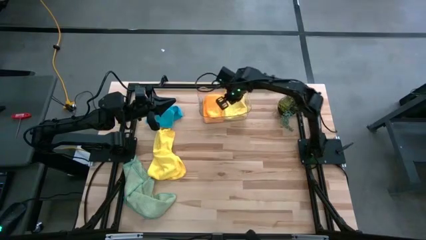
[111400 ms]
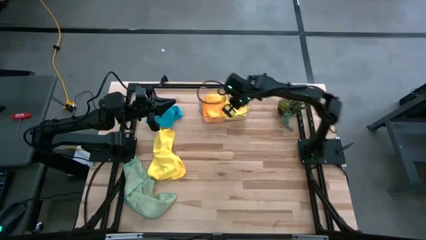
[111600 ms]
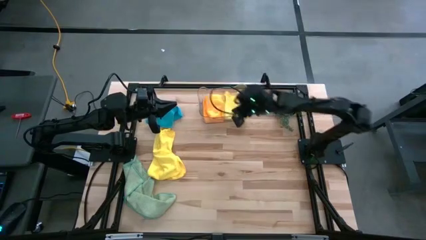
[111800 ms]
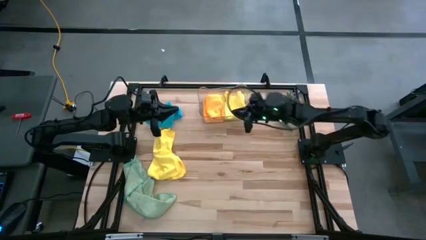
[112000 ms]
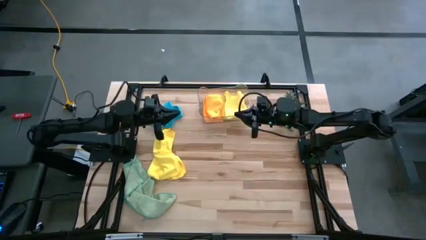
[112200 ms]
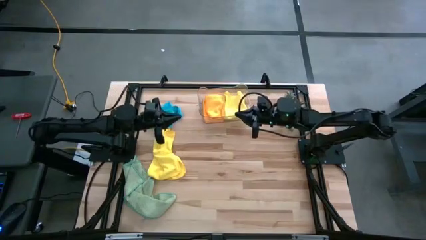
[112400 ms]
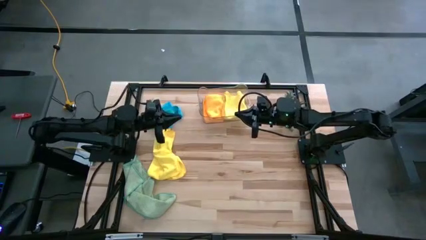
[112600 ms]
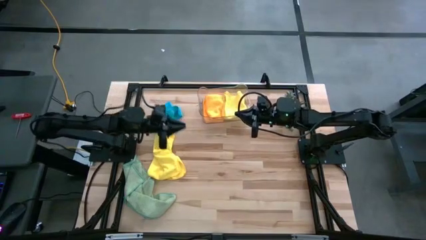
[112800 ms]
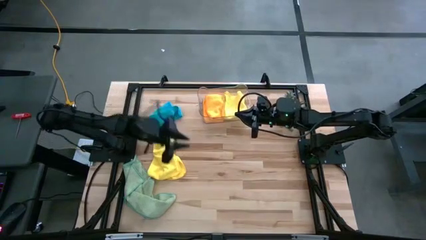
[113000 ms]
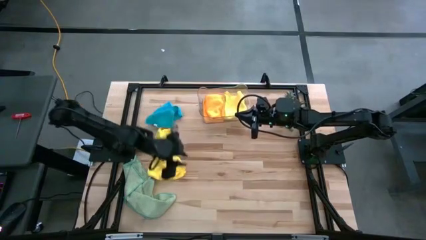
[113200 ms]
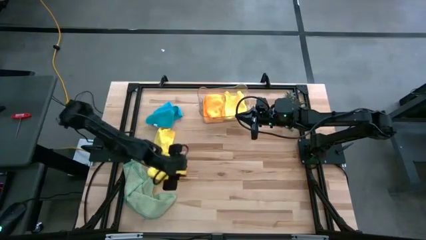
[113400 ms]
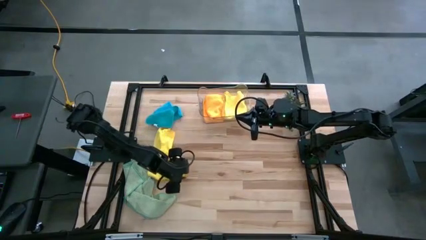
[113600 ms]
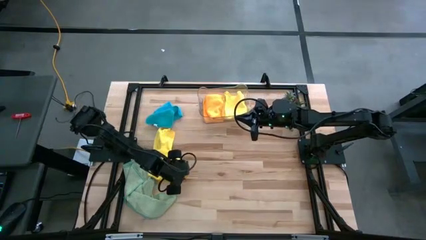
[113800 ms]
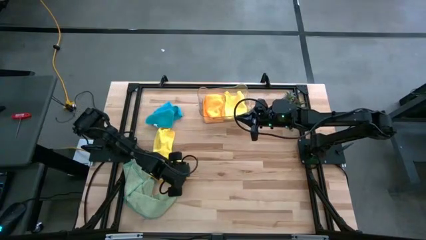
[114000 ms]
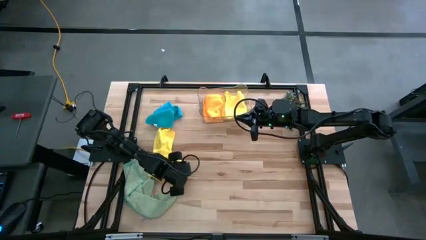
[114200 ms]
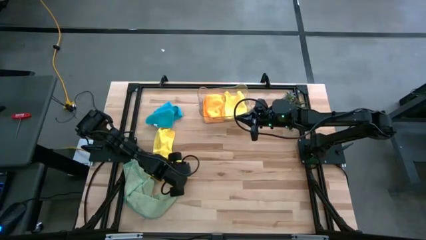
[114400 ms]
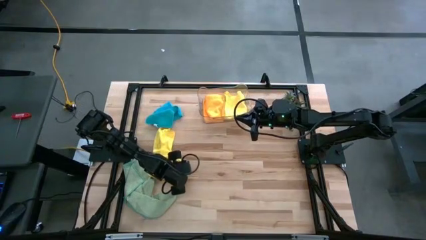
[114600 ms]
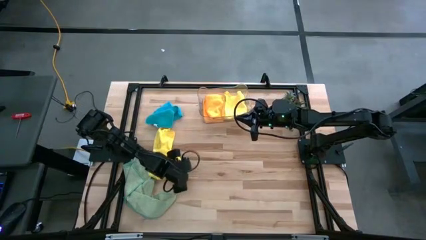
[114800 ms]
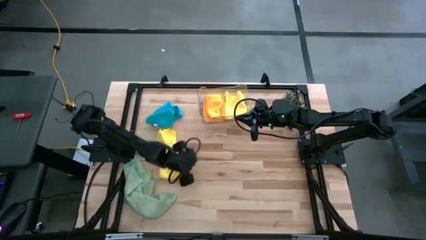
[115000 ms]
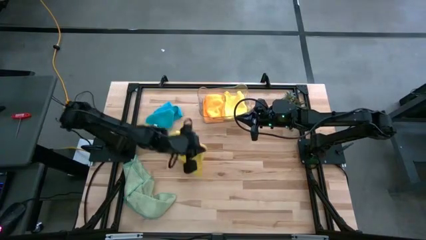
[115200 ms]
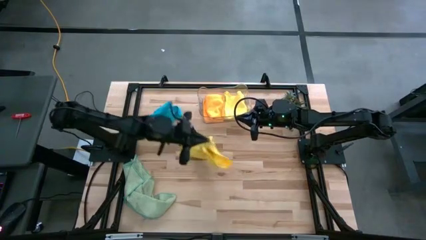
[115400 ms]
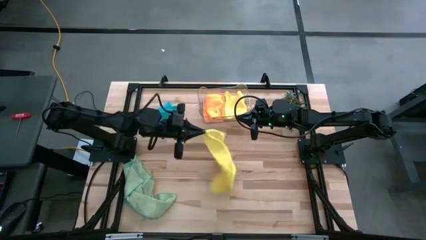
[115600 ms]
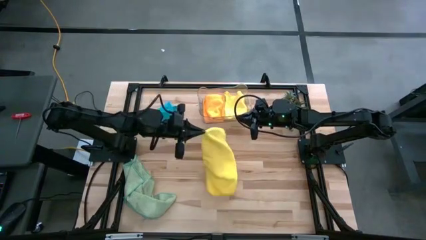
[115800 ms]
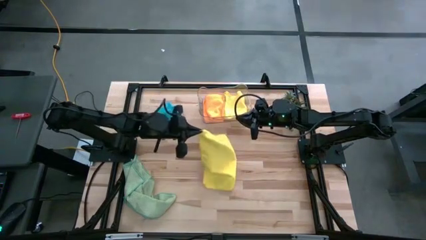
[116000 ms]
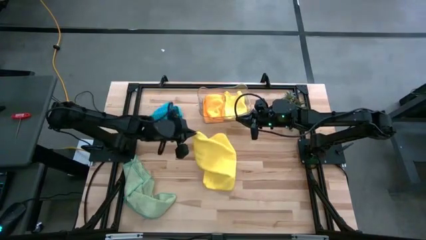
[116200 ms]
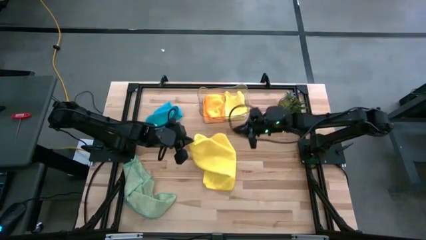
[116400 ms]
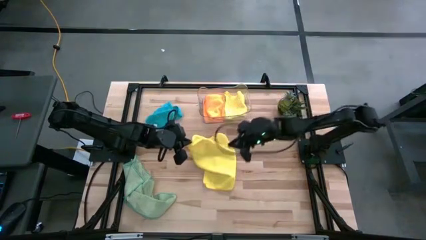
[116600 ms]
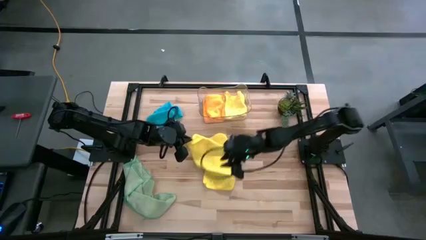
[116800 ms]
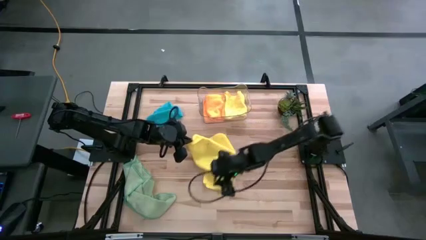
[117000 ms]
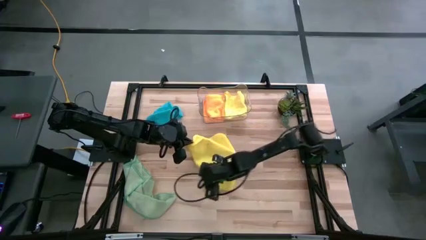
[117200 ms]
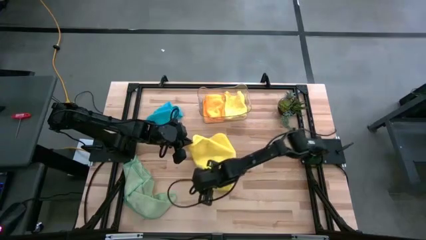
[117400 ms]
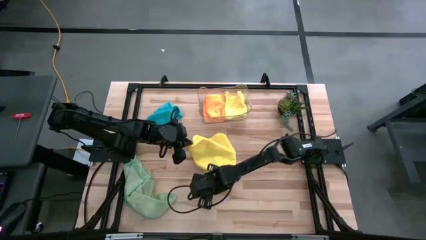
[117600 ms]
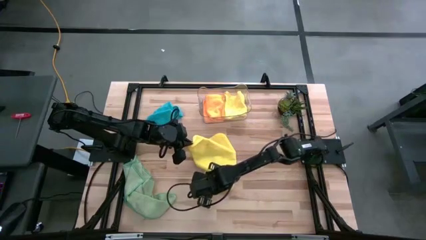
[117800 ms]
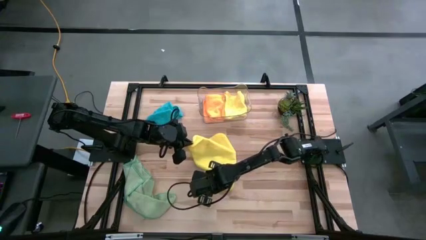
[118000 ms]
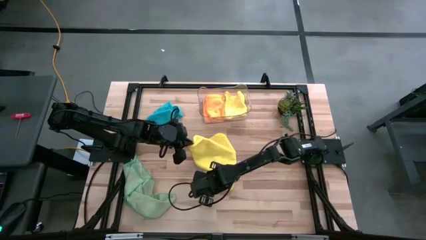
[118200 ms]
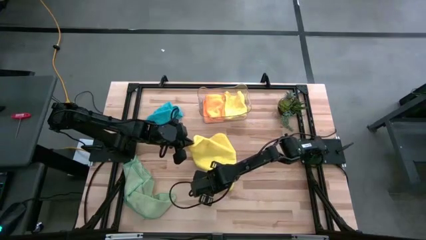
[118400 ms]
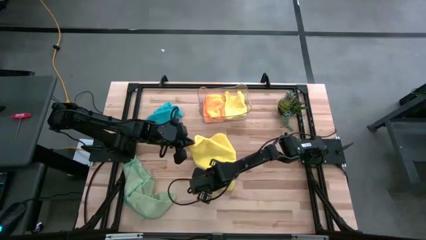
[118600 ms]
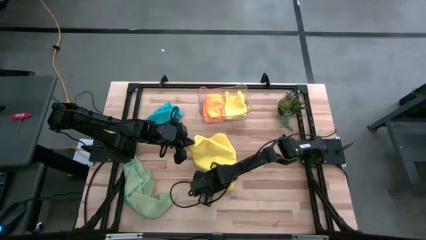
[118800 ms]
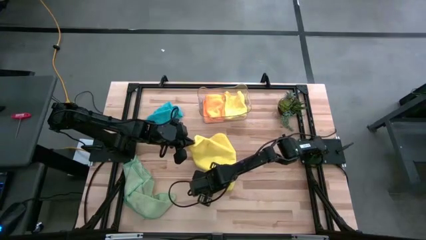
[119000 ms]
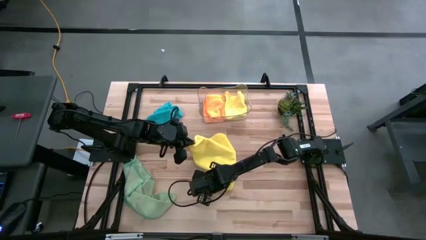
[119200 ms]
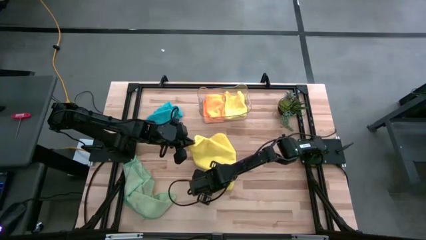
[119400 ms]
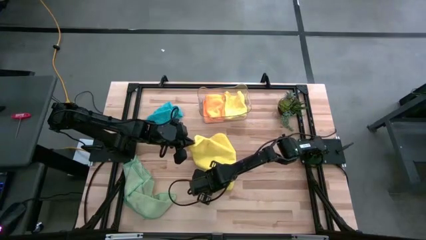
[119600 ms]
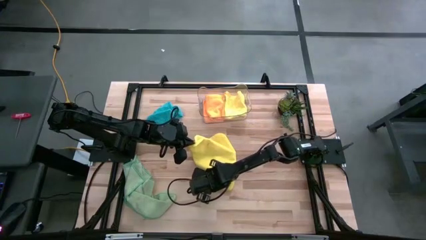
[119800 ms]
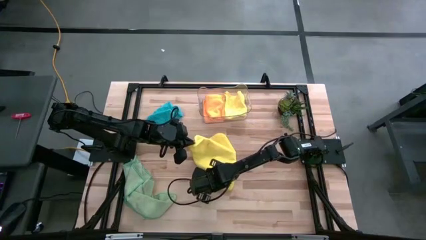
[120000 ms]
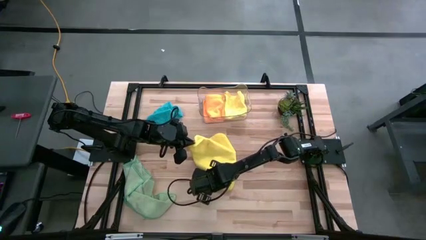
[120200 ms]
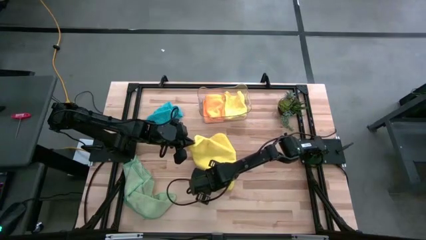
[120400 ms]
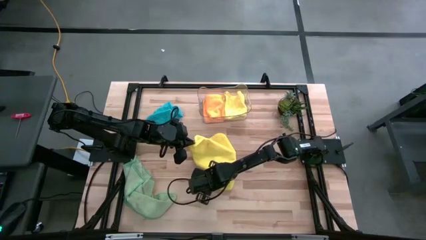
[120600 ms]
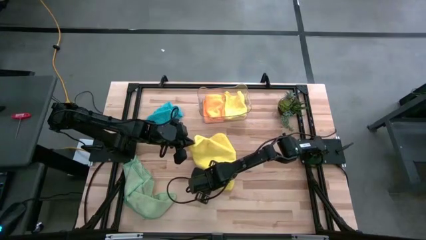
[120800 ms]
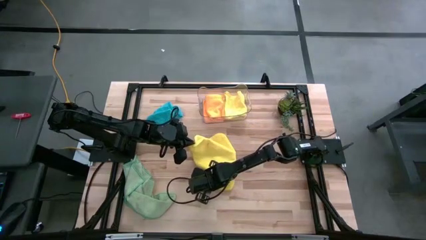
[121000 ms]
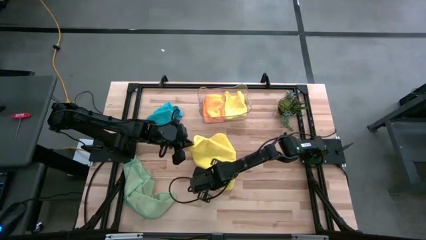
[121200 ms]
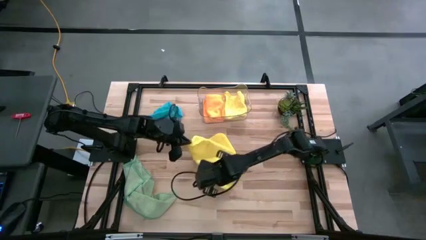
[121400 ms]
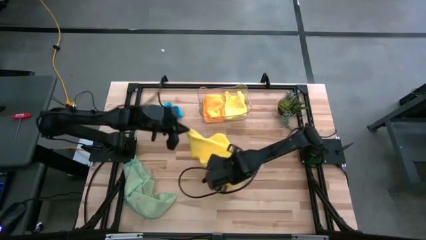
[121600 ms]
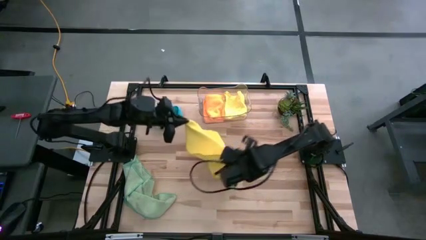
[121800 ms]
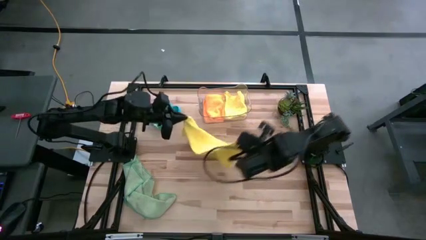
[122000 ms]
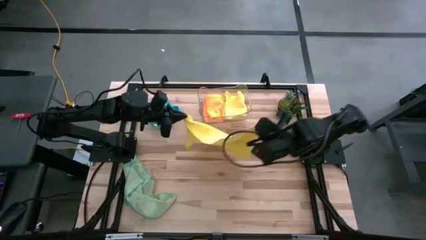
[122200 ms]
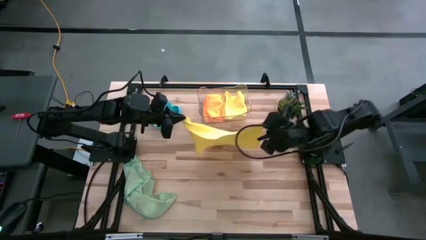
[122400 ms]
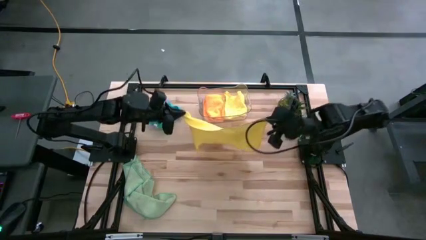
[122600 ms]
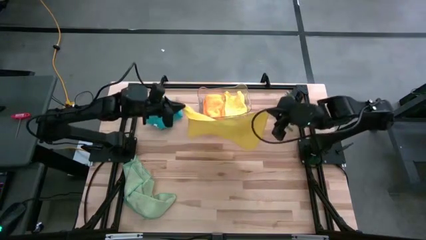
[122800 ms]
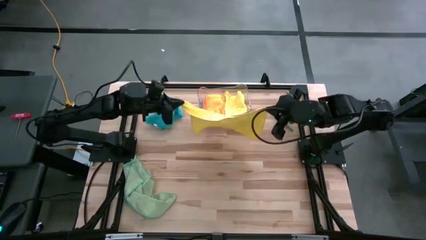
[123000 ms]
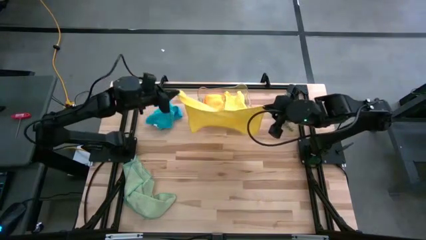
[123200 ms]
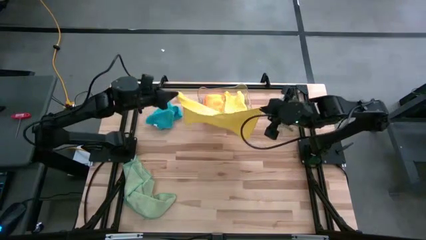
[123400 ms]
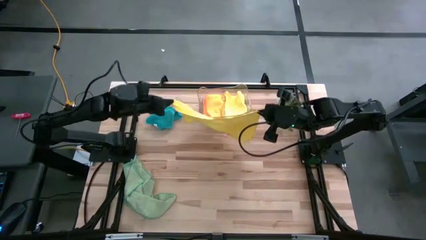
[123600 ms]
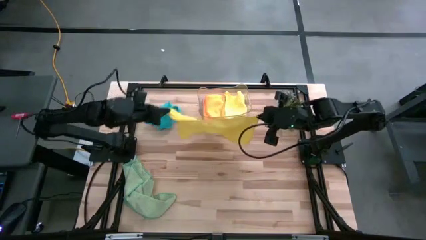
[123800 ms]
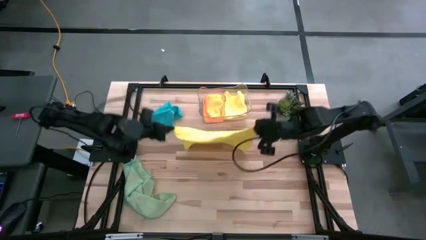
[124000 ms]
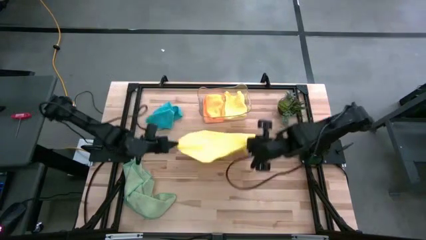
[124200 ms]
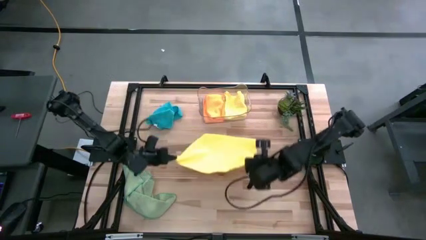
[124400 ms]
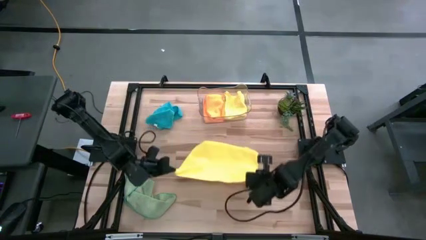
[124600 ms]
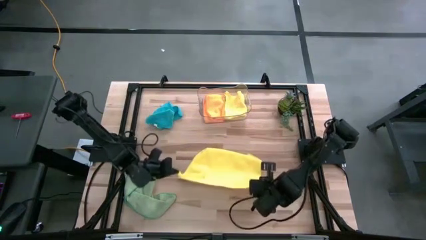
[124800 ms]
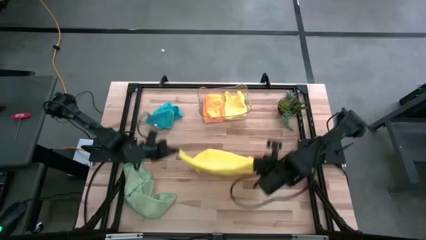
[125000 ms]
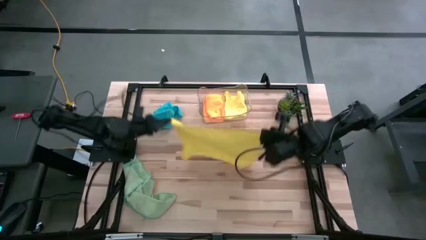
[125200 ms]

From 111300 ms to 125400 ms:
Task: Fold microfiber towels
Fold the yellow microfiber towel

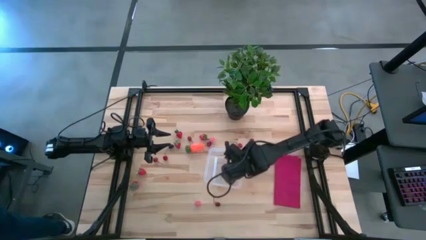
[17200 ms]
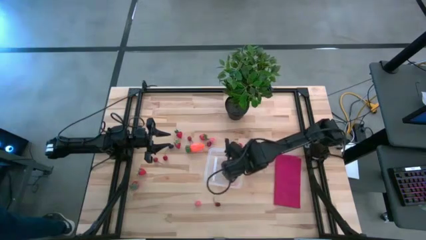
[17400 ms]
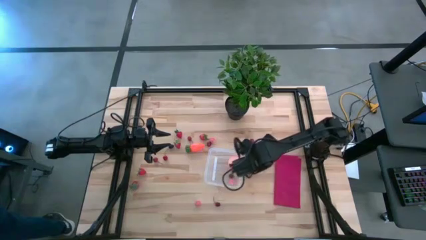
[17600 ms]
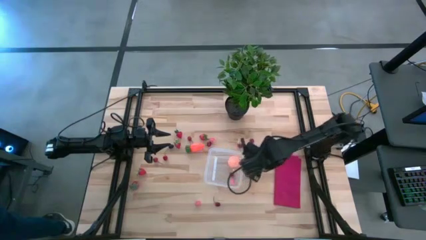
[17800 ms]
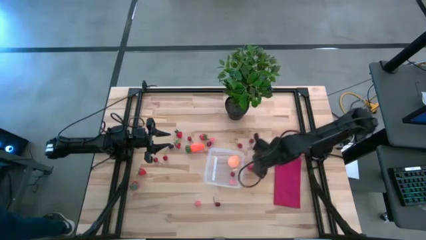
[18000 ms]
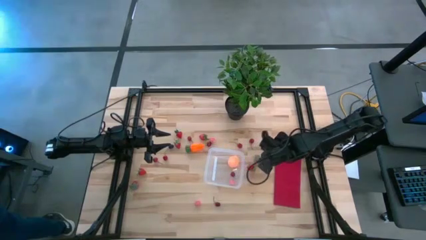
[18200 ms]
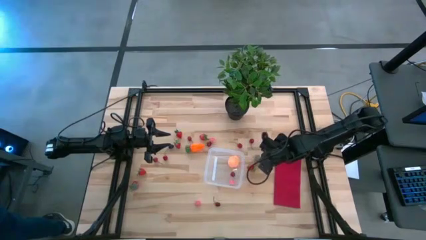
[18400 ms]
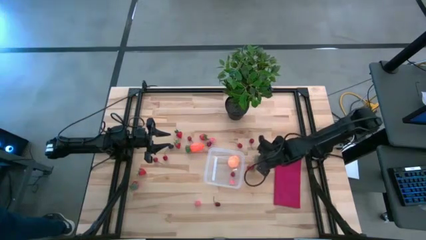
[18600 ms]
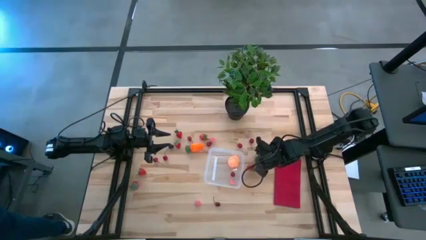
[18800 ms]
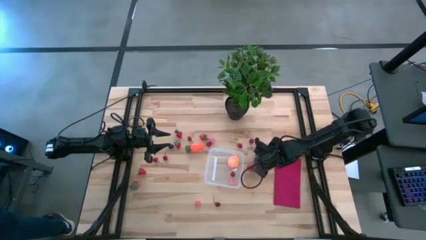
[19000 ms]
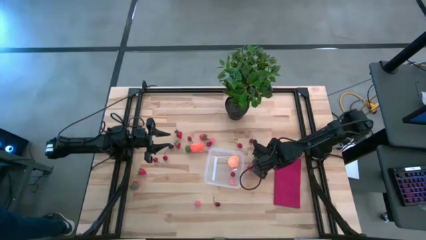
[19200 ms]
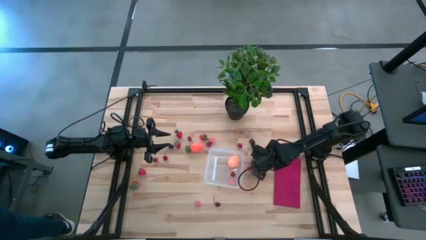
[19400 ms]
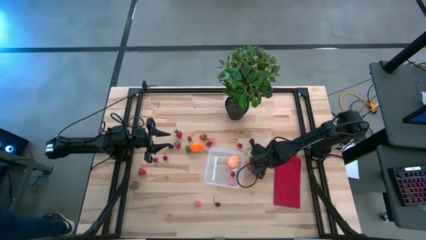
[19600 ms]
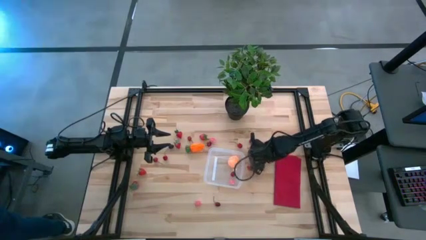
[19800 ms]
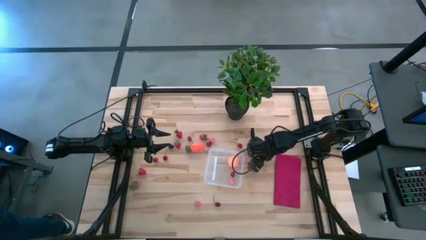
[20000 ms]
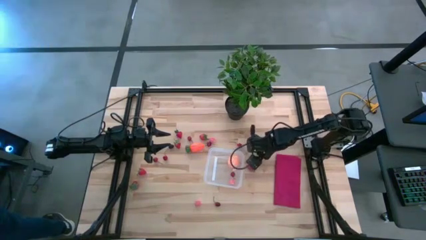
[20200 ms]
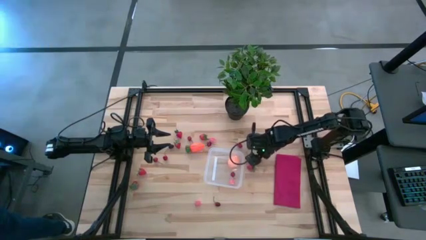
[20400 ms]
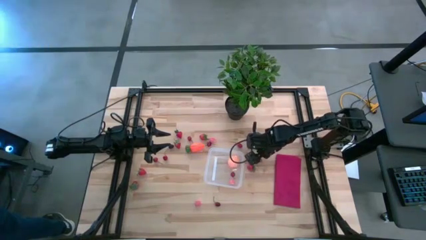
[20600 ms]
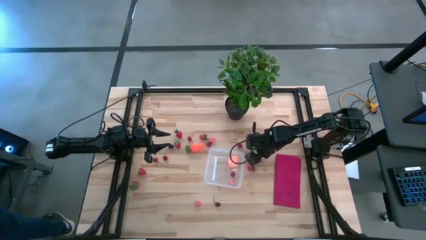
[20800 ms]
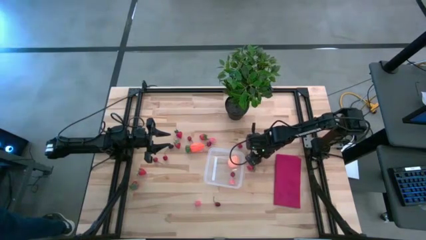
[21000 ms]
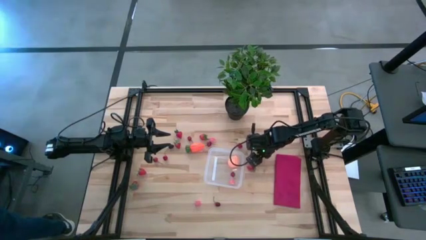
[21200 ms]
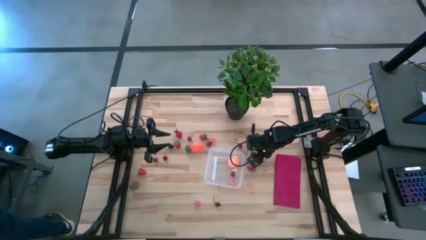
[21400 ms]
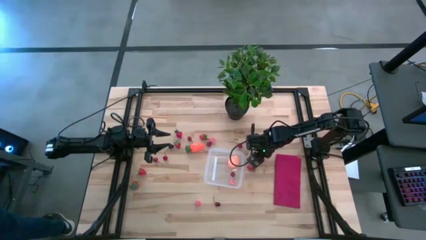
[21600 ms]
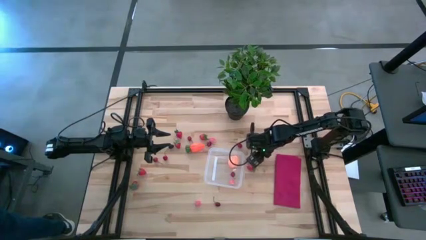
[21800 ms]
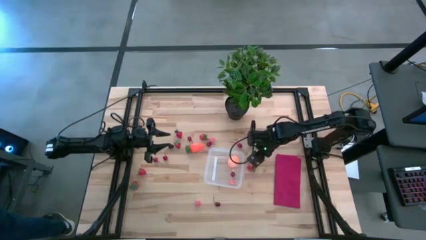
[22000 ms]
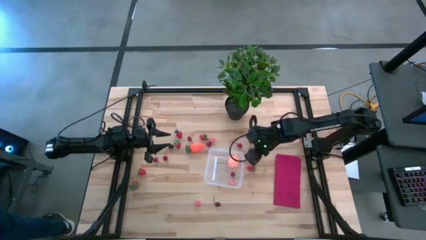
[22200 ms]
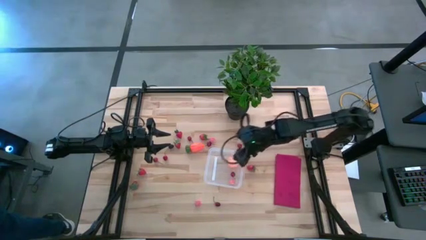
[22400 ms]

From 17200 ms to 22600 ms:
Task: Pick and placing Produce into tupperware
Put the red strawberry into the transparent bin
